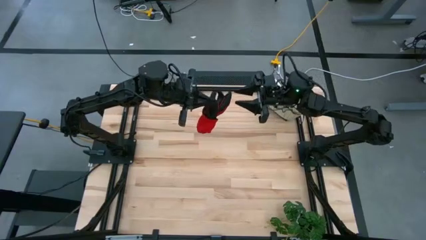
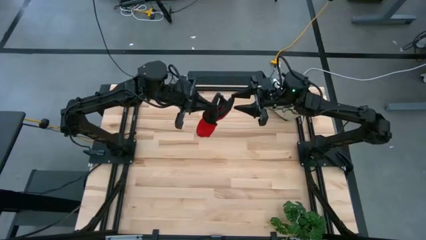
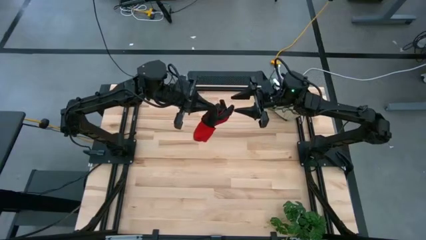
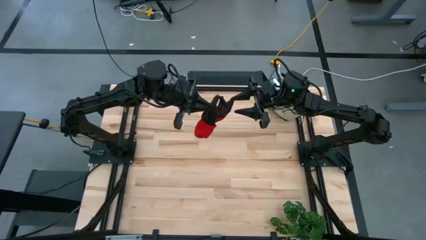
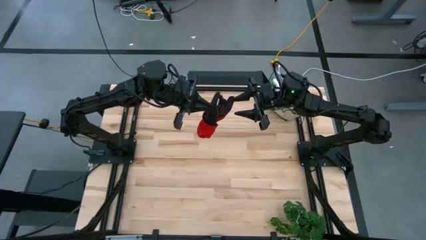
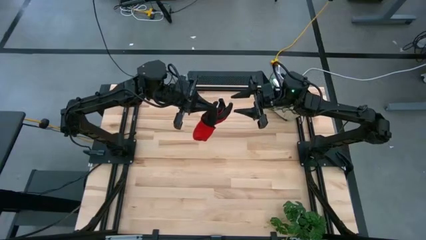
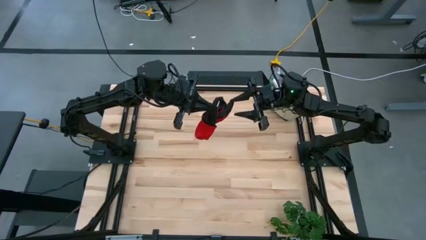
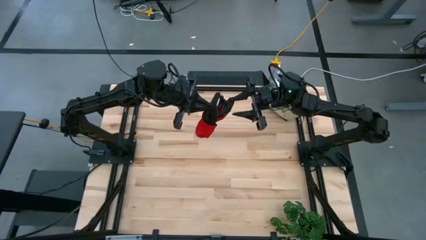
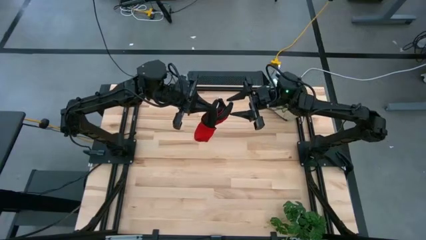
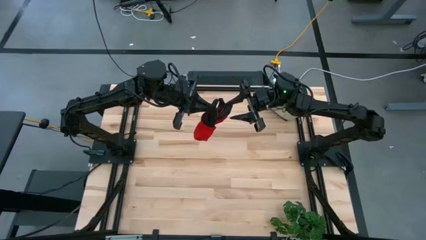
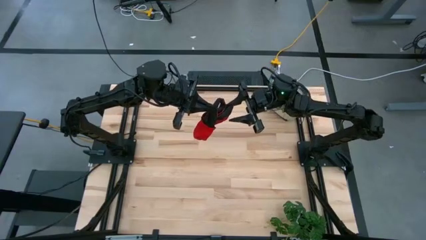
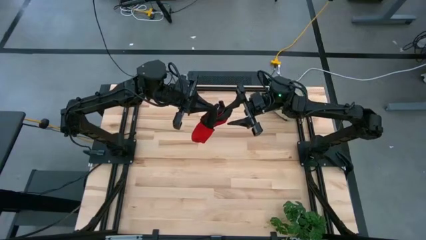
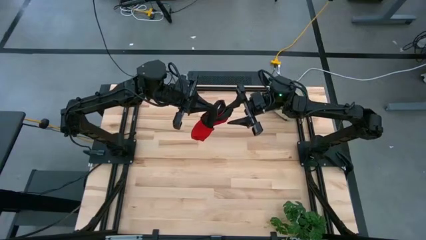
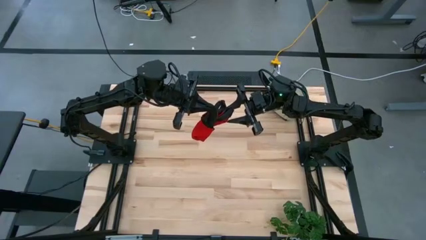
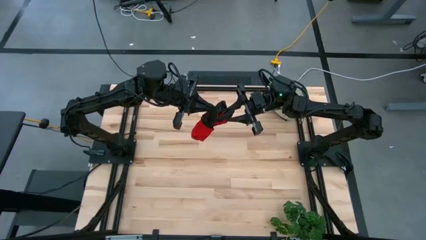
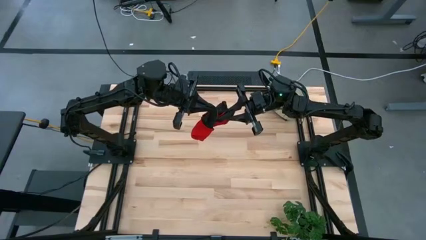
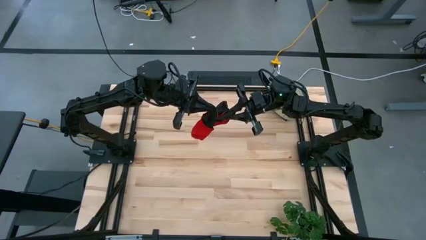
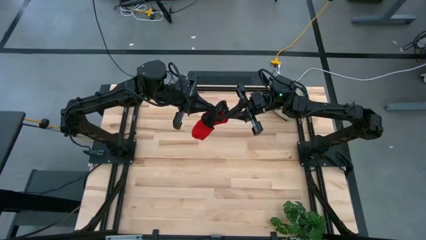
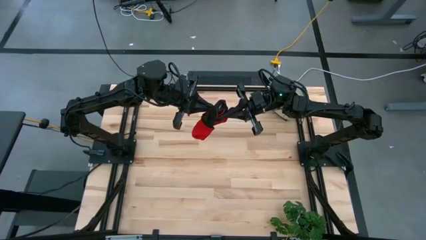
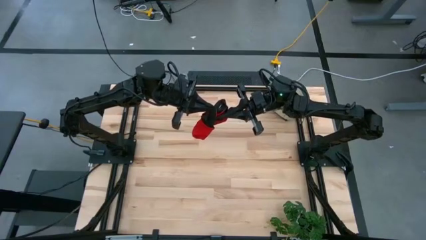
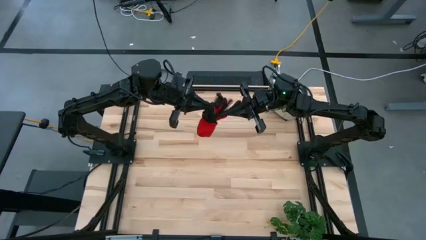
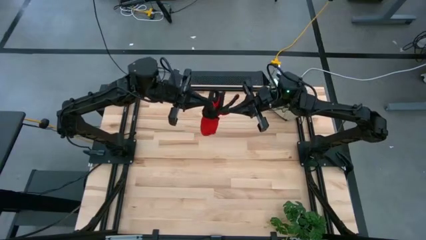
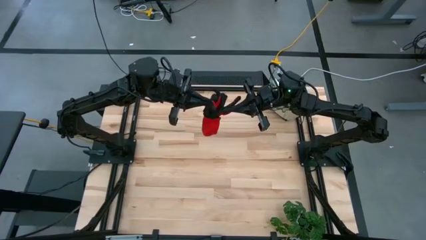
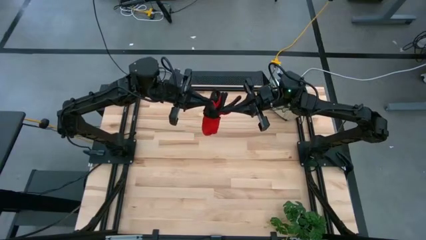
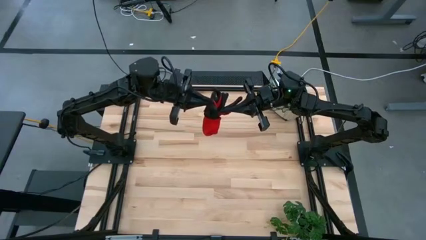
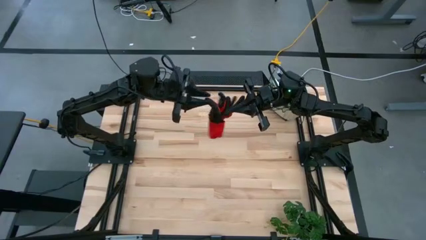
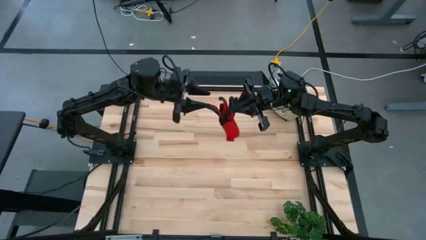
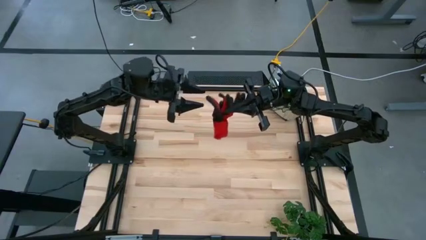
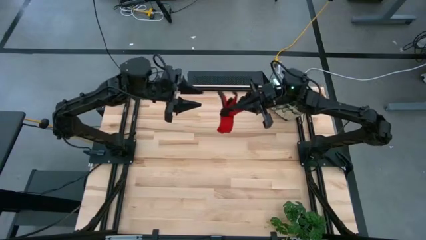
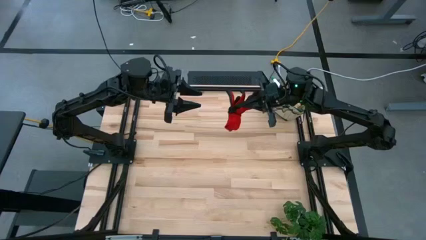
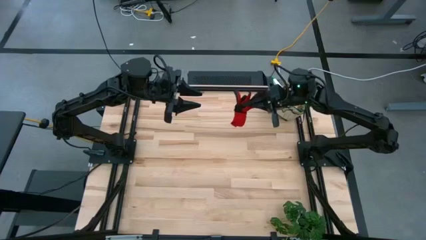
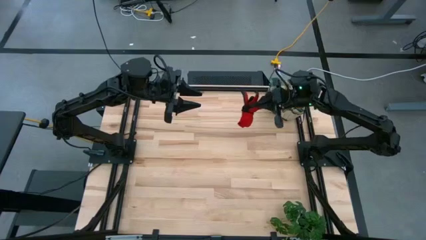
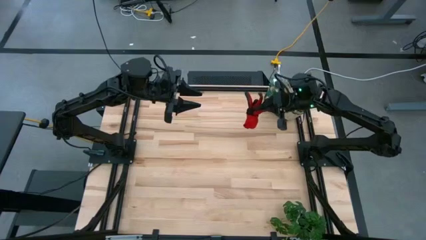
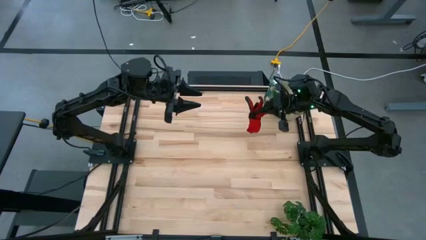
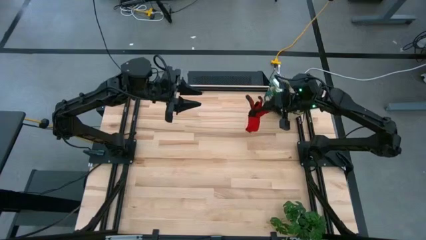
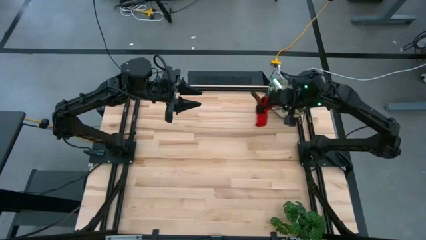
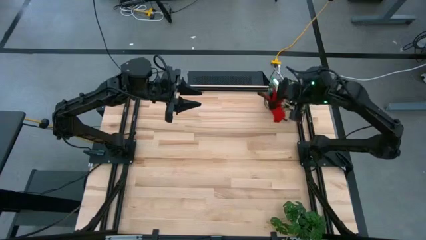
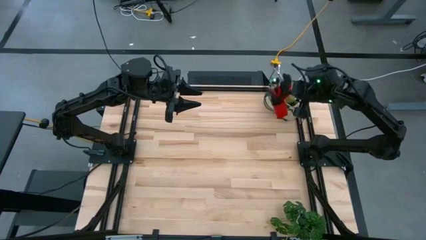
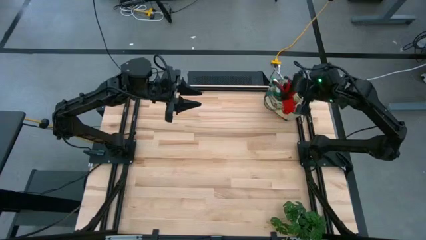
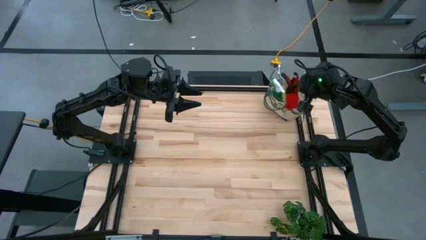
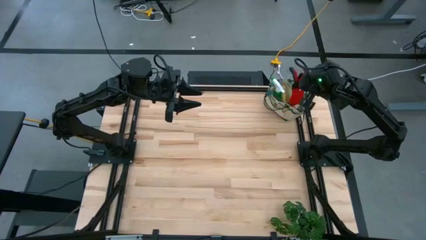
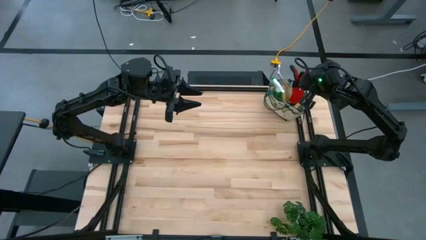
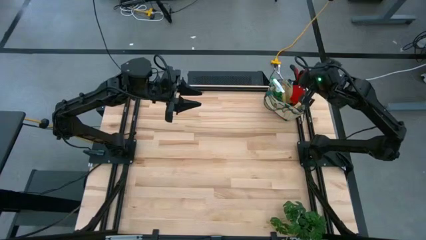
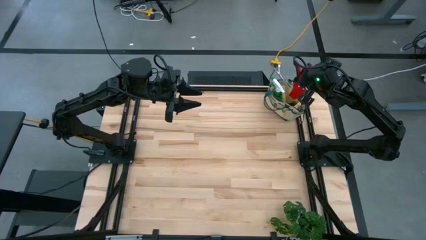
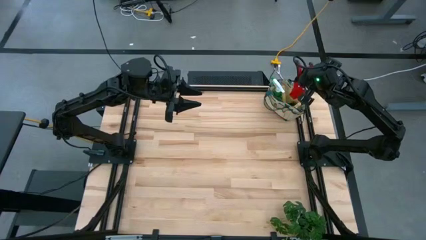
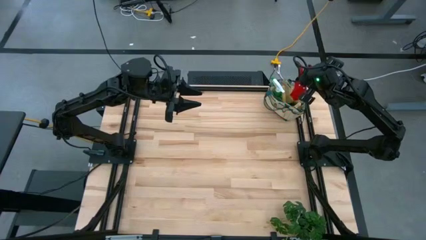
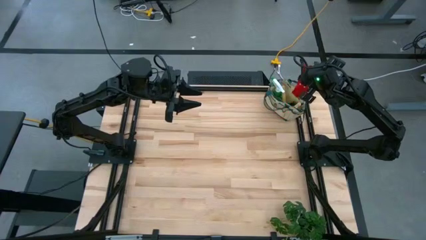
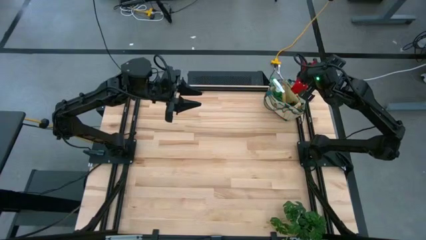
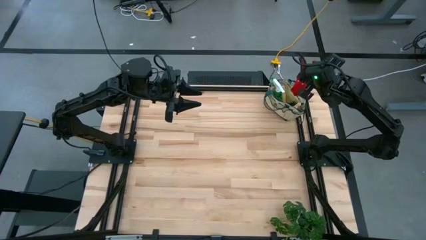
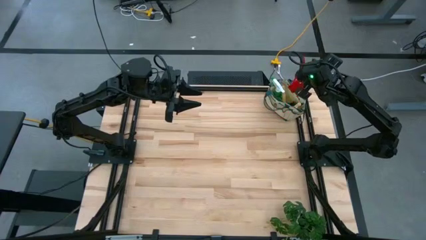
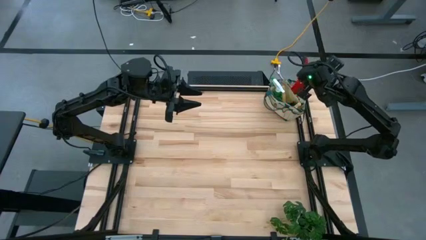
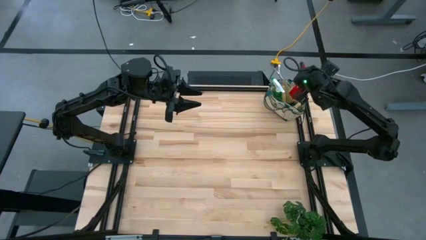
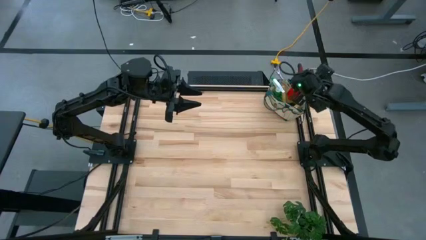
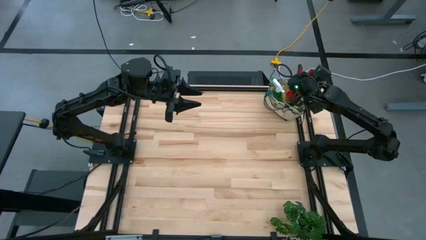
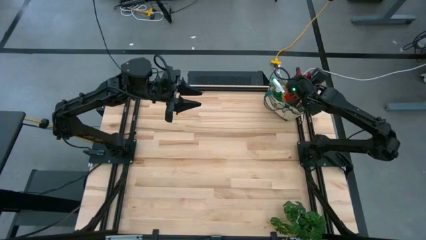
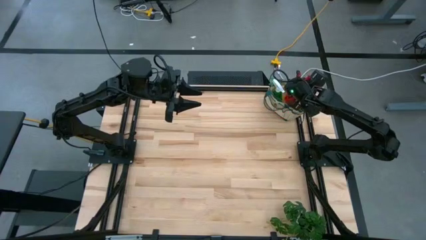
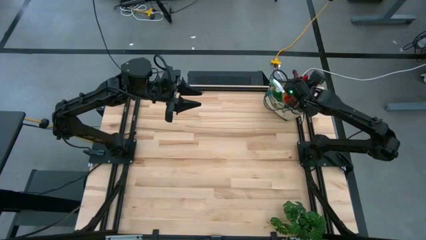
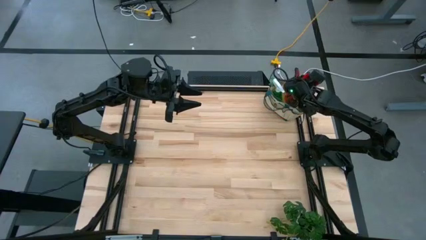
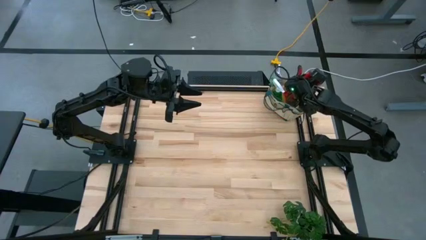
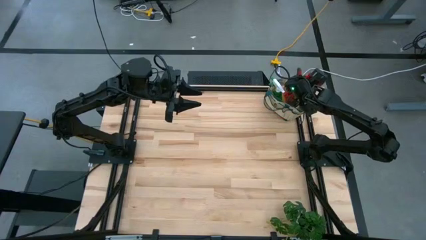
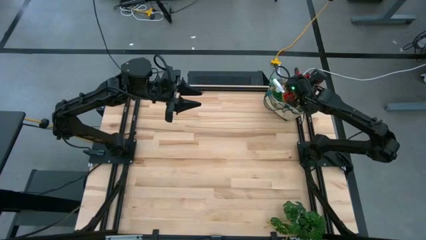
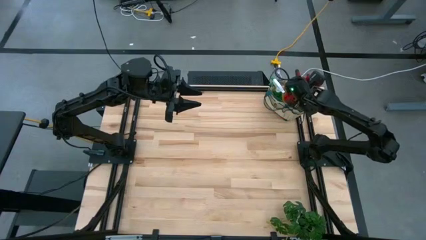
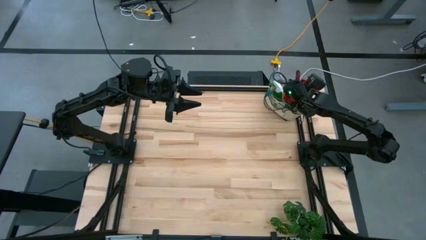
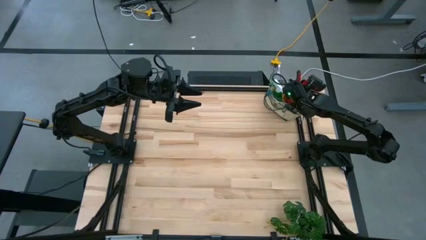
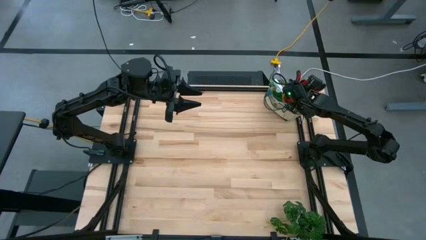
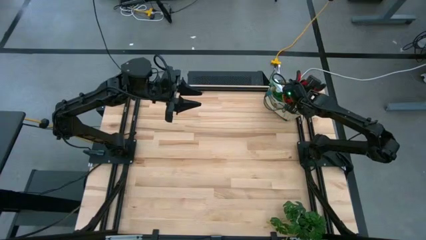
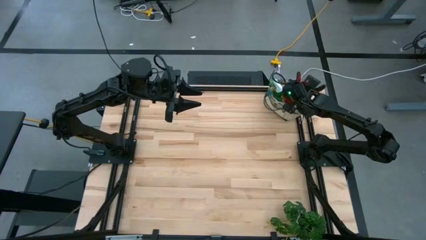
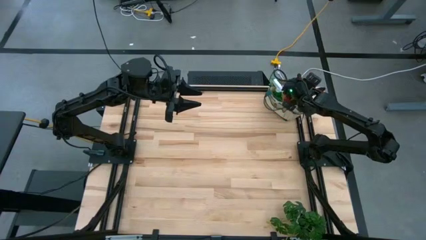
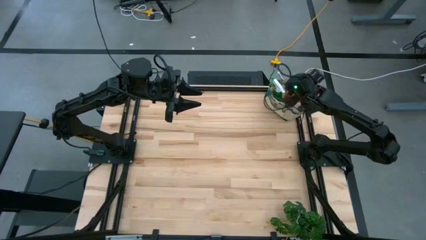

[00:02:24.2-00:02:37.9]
Task: Pick & Place Garden tools in Gardening bag
Put the pair of gloves into the gardening bag
